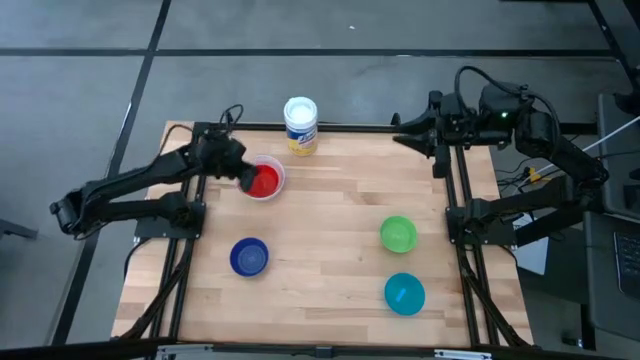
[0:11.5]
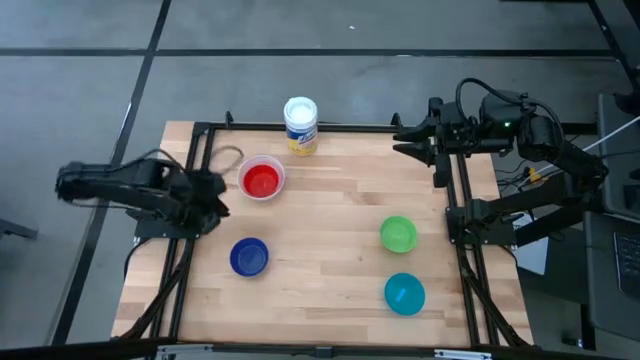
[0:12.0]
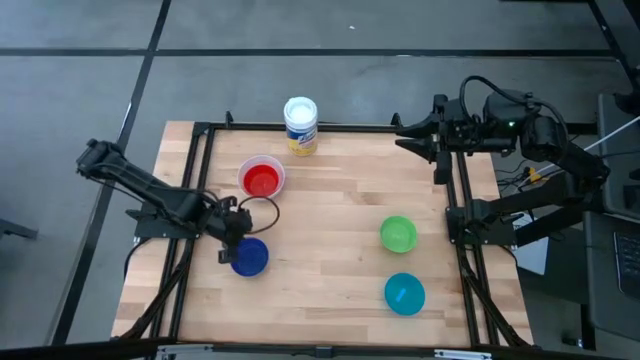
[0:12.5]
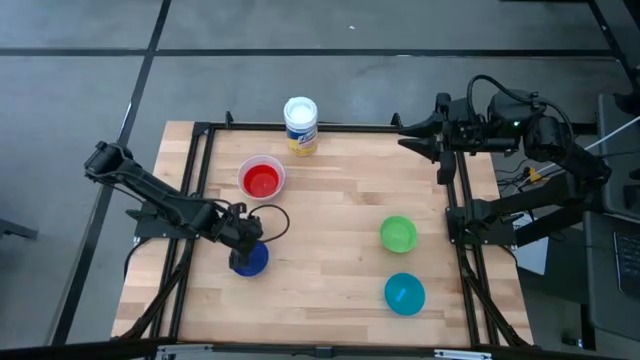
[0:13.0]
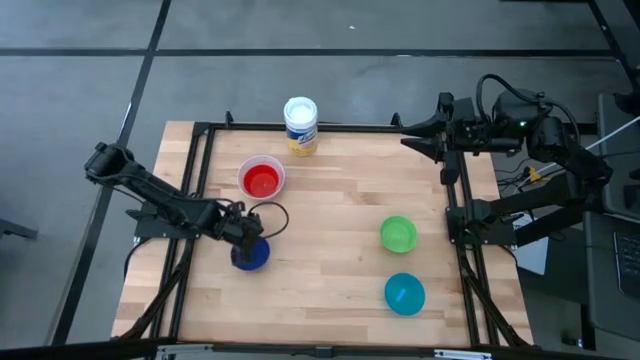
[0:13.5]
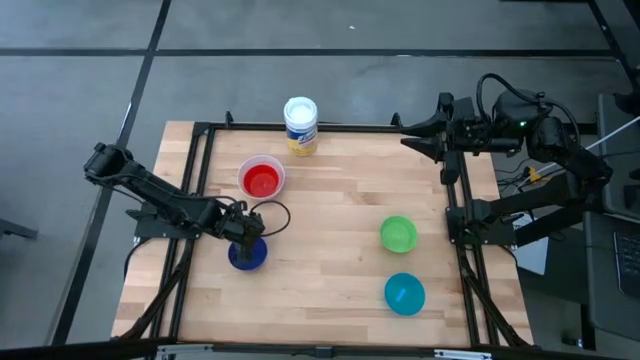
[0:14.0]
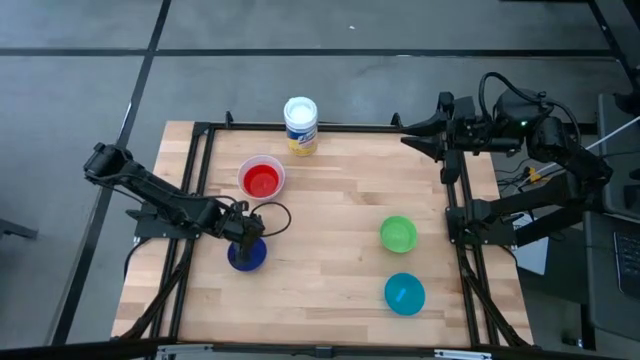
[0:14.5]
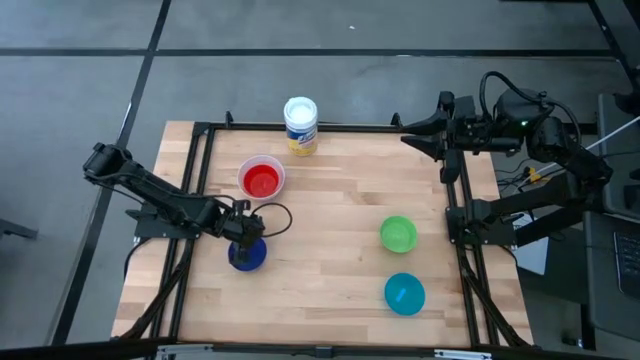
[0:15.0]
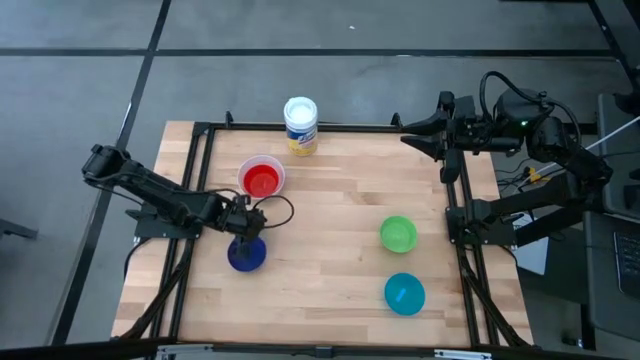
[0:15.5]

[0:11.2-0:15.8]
Stack the blue bowl on the red bowl

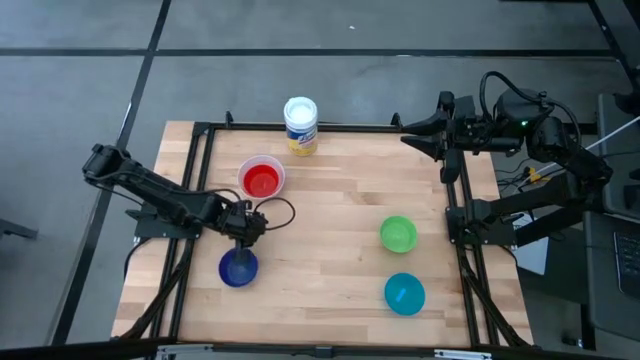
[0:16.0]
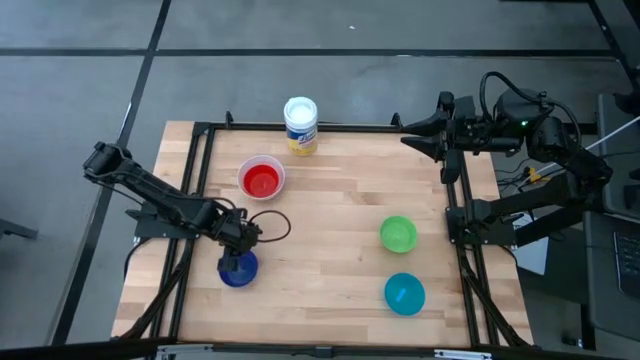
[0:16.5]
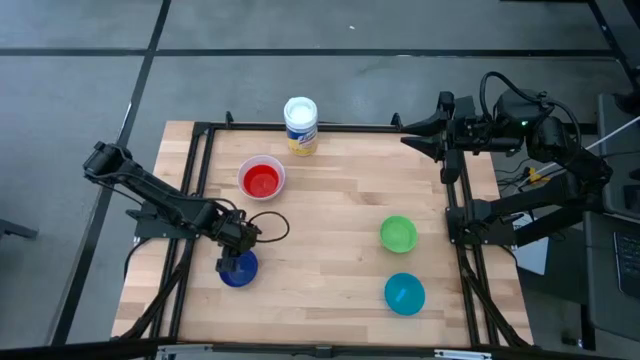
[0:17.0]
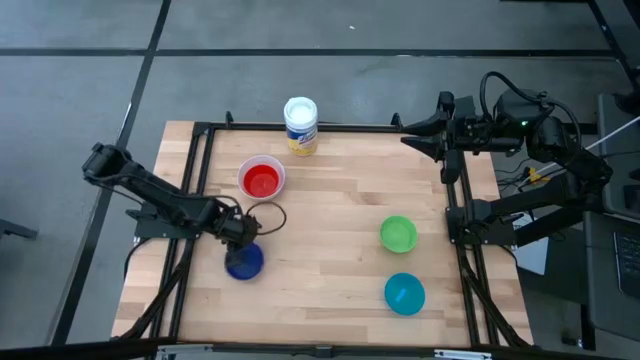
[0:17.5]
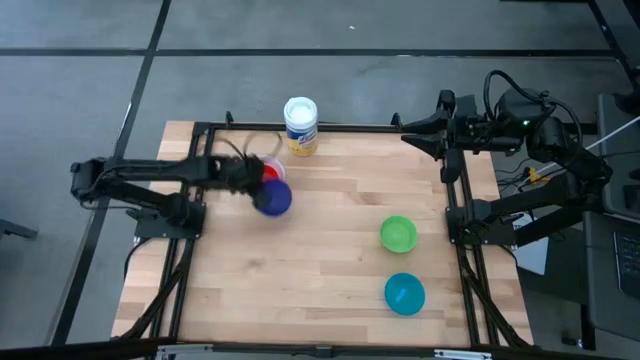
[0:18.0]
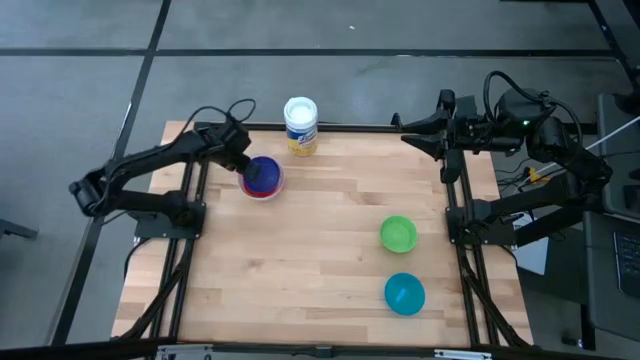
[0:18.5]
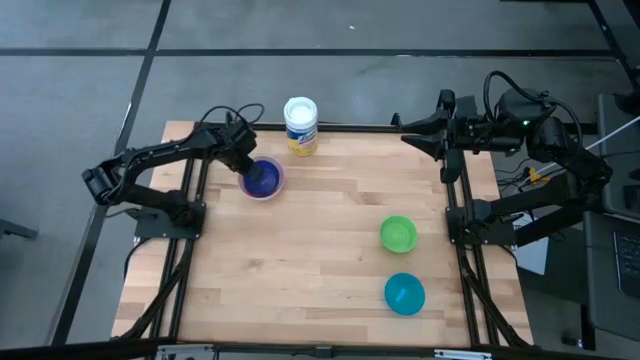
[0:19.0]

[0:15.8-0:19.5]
Stack the blue bowl on the red bowl

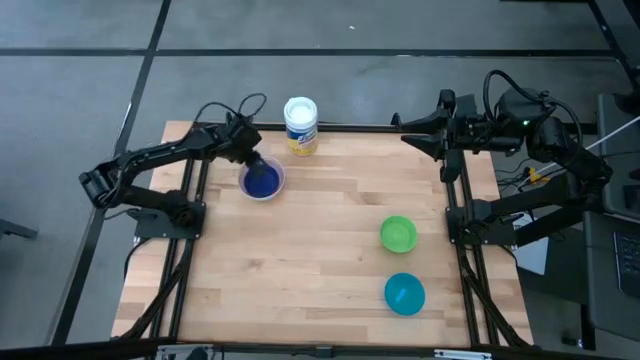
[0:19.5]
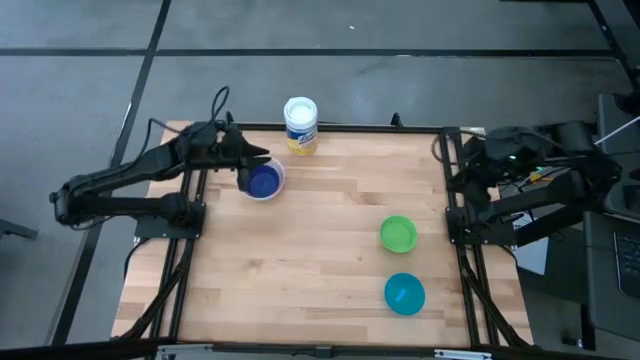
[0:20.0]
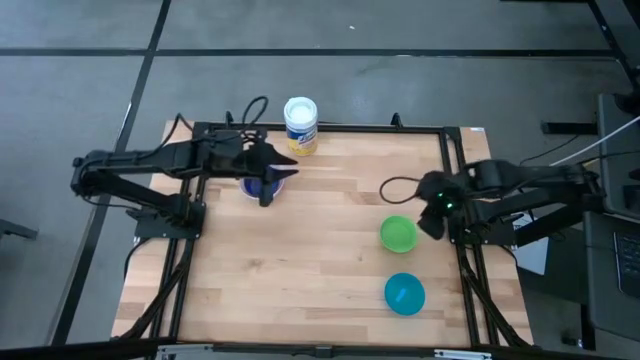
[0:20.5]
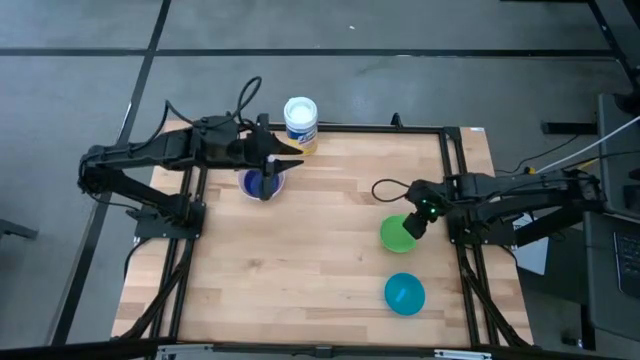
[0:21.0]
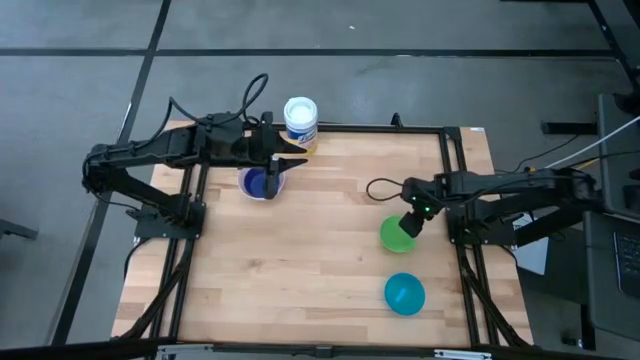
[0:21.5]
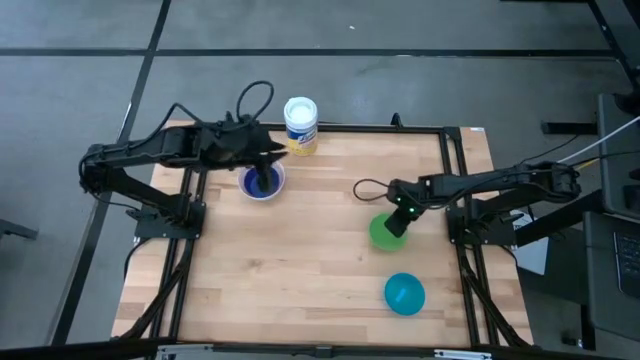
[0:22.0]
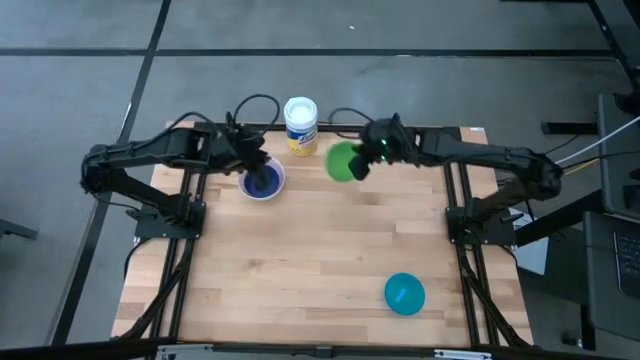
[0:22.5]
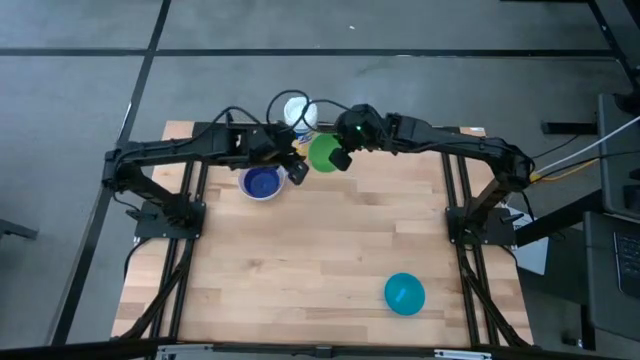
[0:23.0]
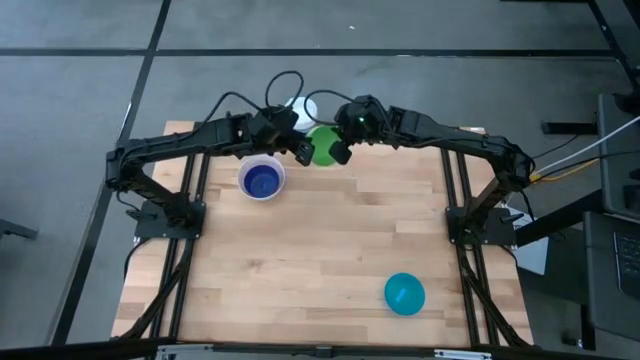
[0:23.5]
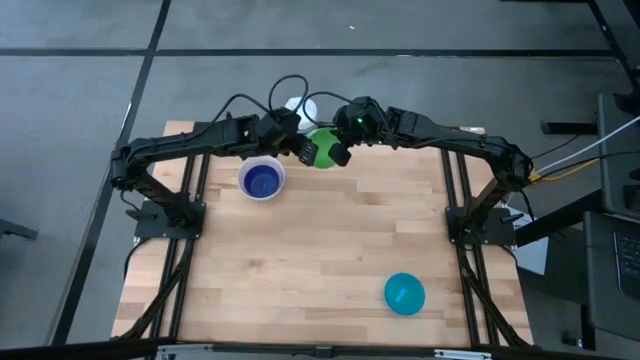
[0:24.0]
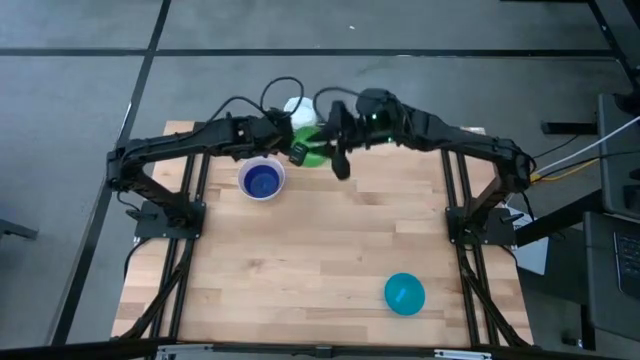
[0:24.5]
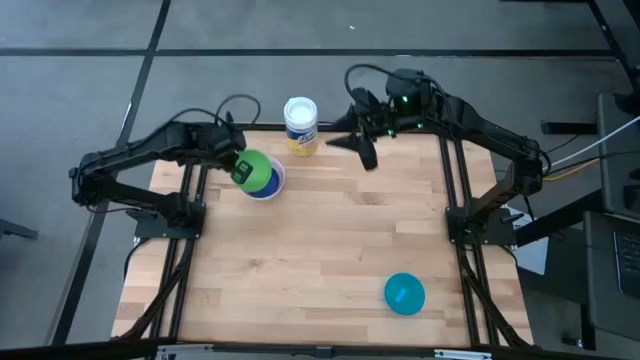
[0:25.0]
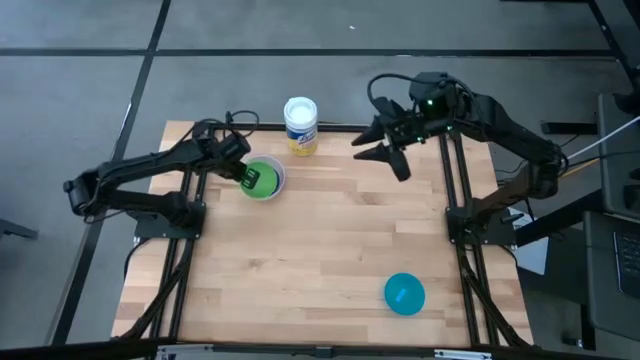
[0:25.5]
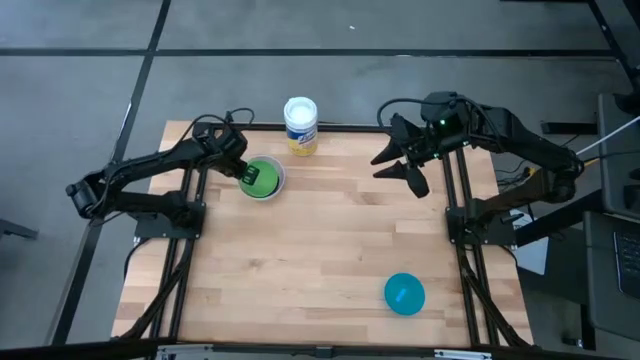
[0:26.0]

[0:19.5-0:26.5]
Stack the green bowl on the blue bowl
